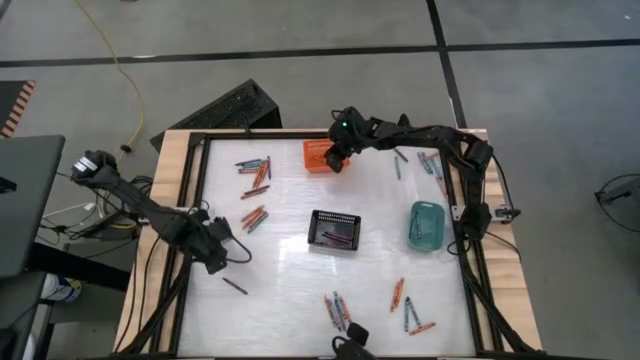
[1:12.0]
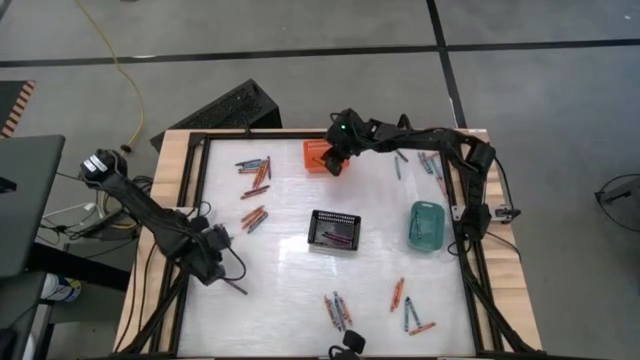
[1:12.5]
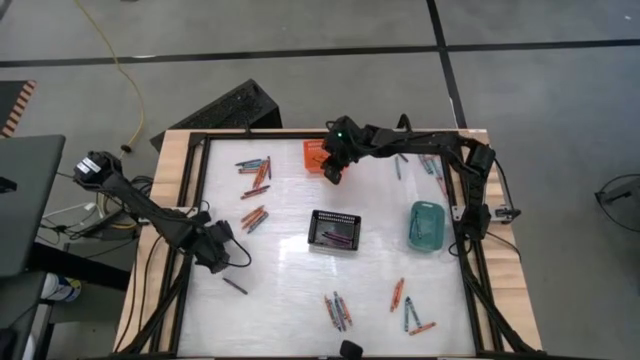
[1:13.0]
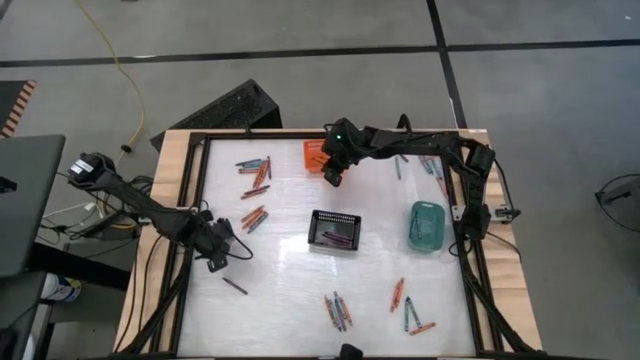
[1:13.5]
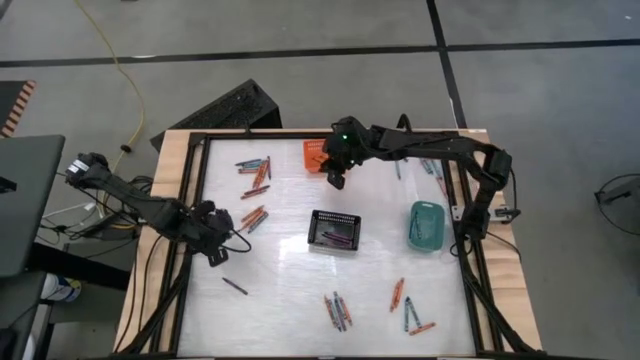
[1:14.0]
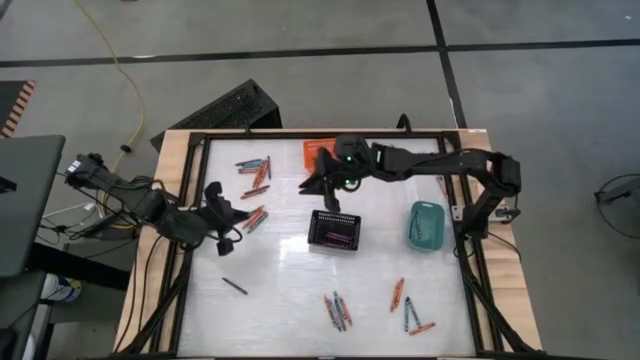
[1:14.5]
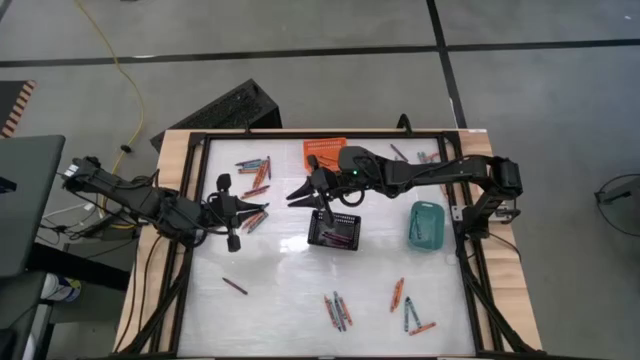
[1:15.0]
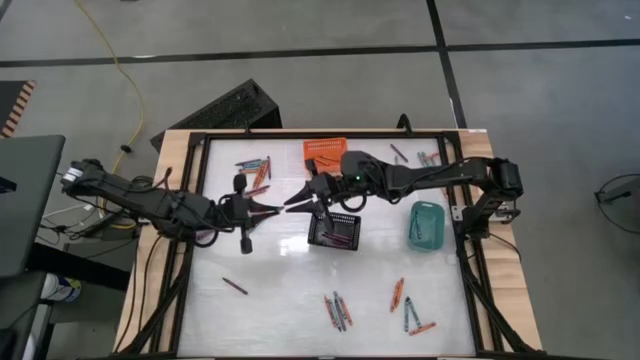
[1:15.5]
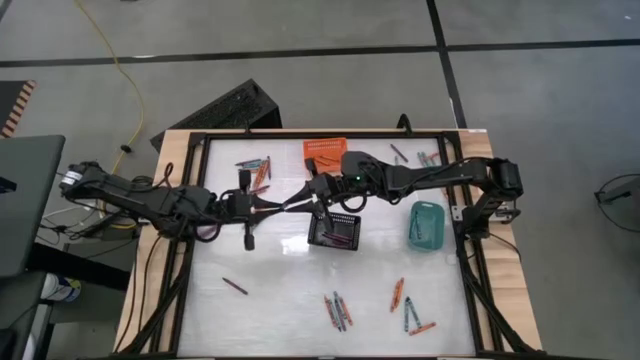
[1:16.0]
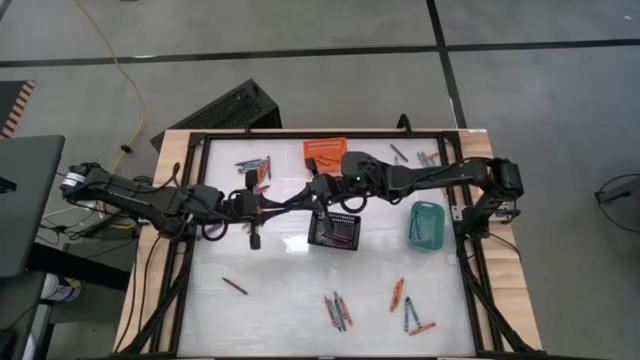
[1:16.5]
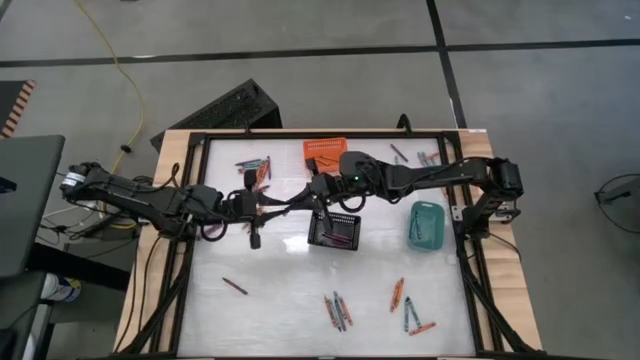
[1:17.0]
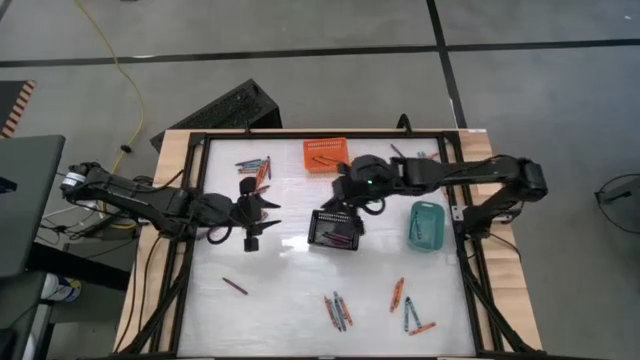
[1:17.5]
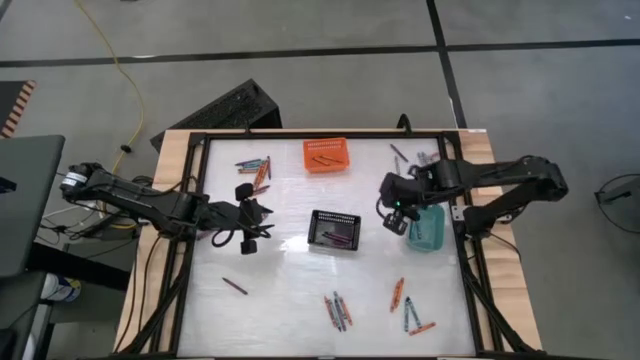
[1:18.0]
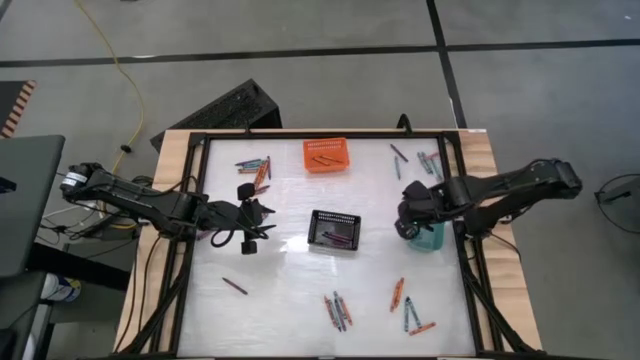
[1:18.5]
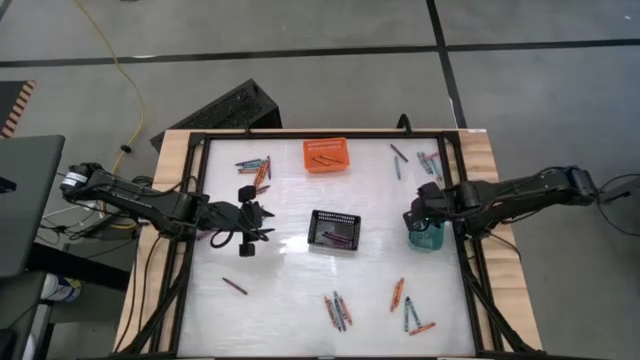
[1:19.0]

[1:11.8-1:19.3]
Task: Sort crayons
Put the light blue green crayon into the green bin

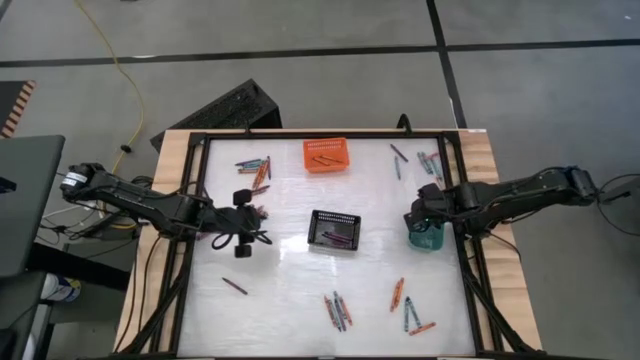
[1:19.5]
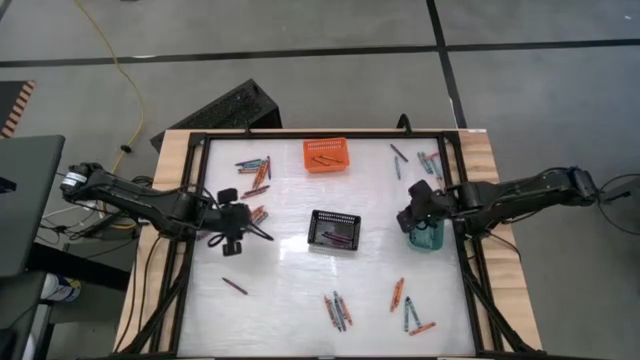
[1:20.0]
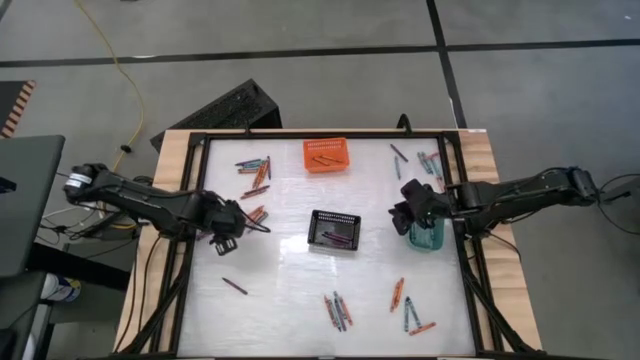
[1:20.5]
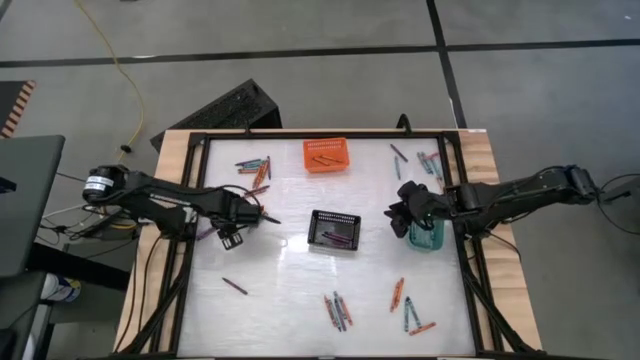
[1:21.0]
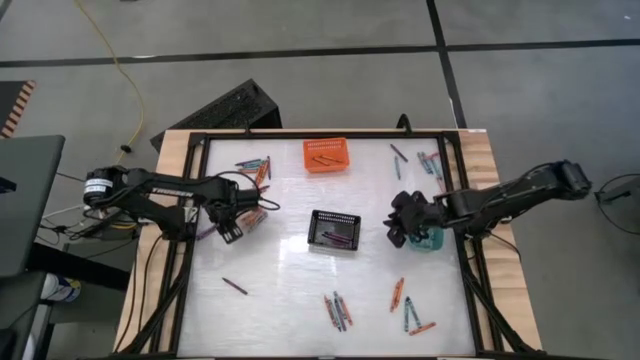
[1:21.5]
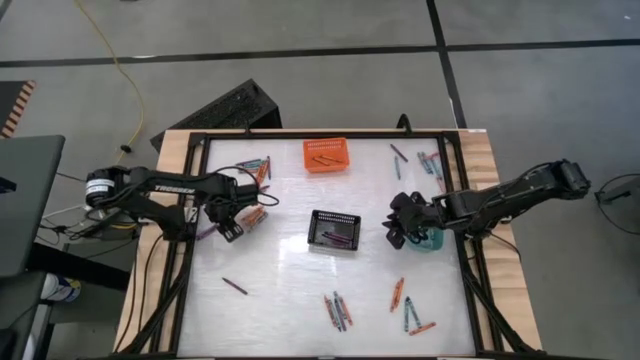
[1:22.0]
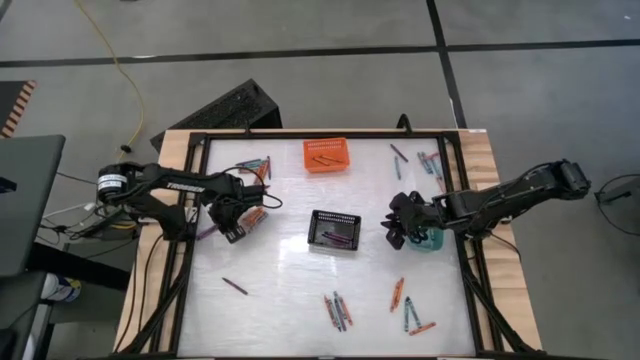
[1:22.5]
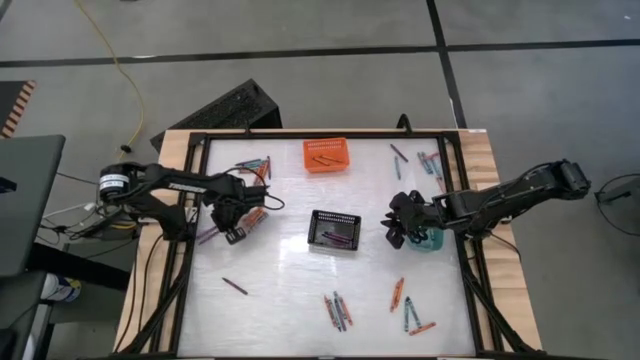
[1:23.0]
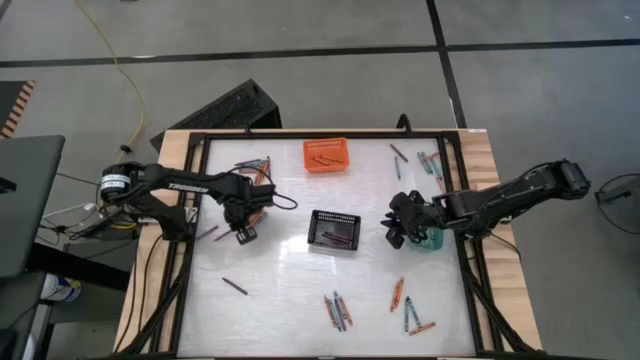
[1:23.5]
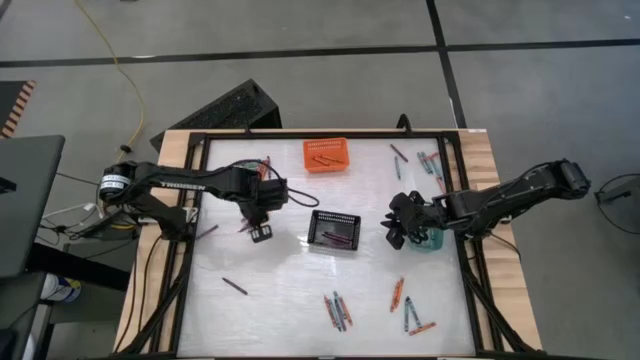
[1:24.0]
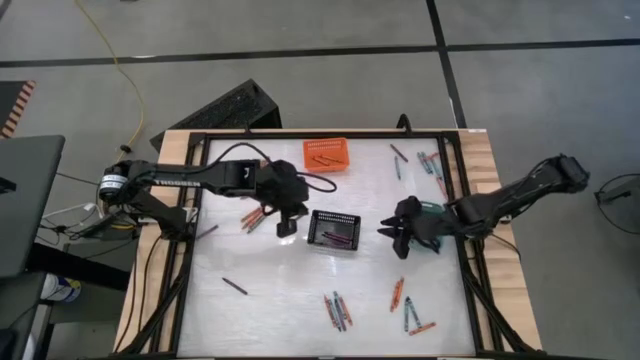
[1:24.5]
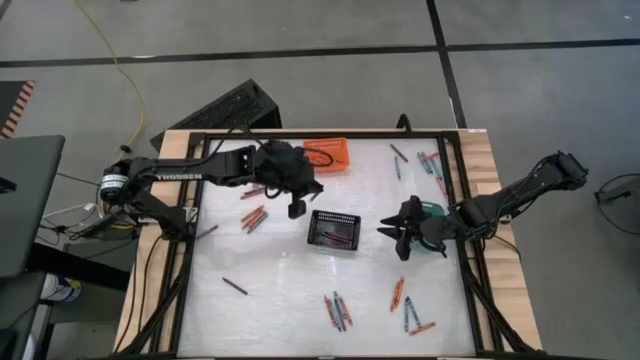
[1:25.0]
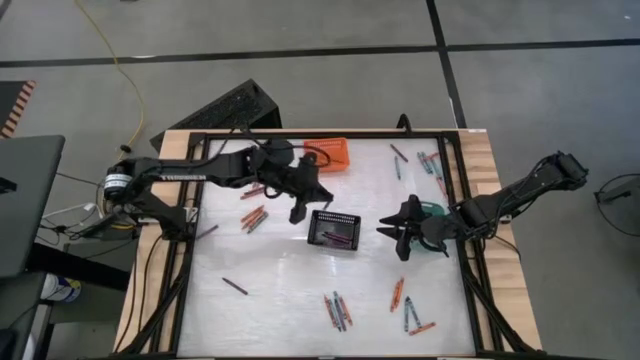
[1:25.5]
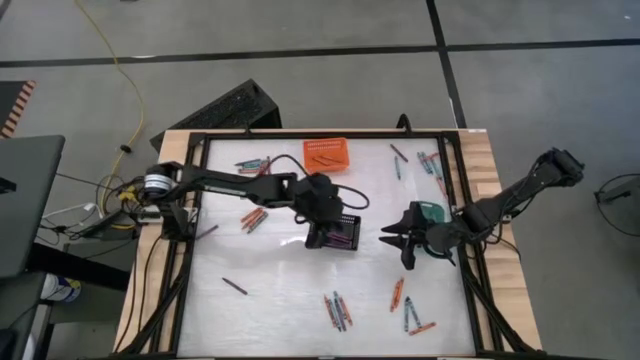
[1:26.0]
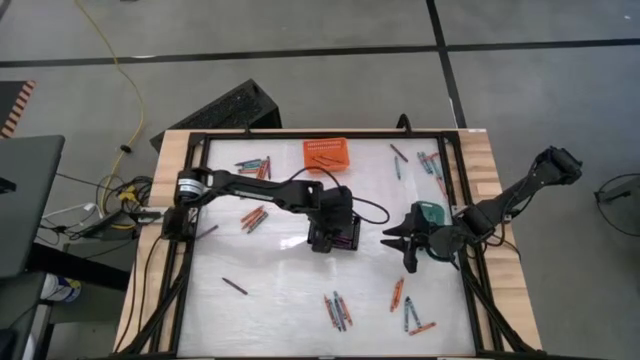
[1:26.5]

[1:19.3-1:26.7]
Put the violet crayon into the black bin

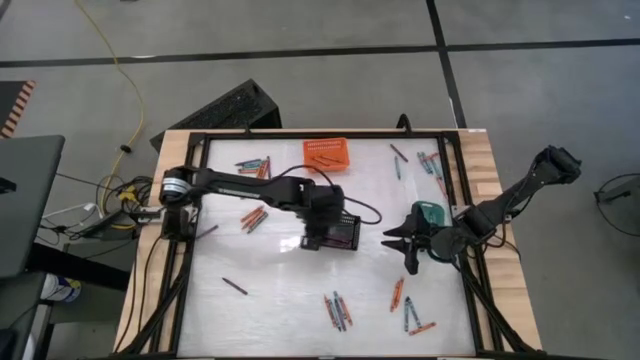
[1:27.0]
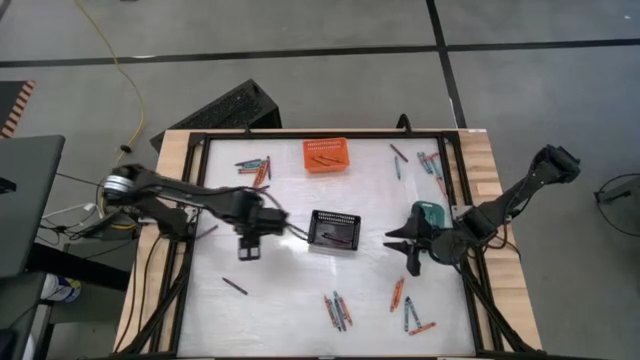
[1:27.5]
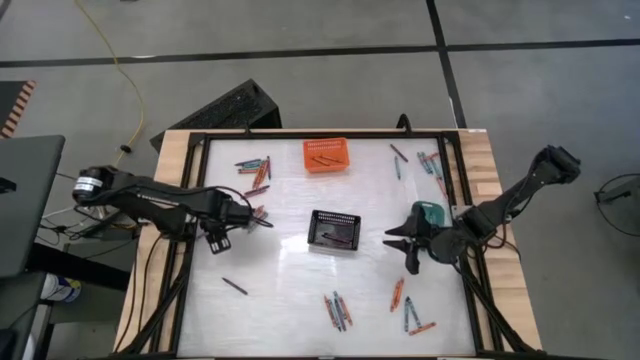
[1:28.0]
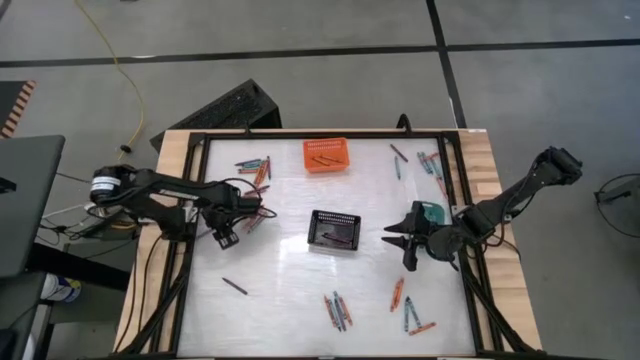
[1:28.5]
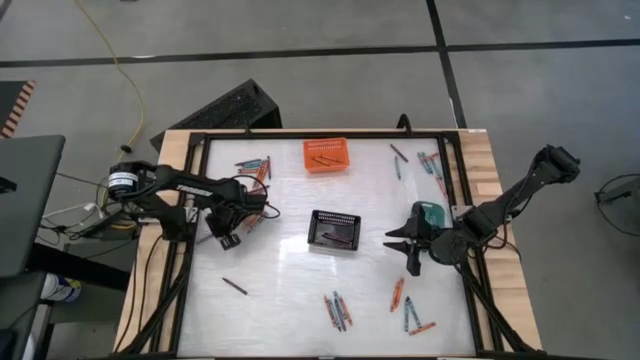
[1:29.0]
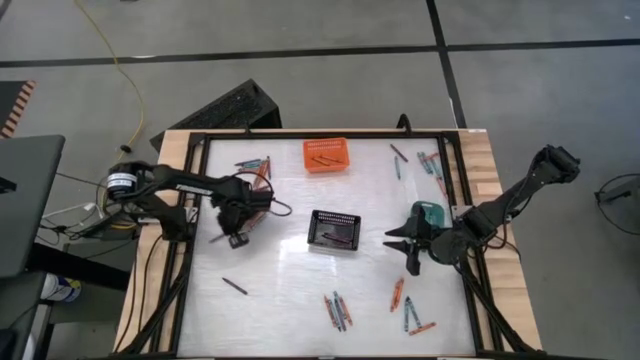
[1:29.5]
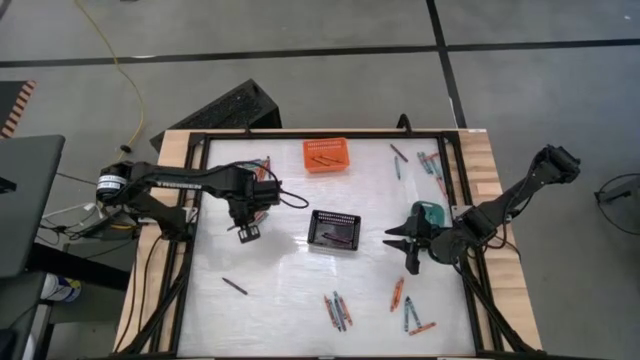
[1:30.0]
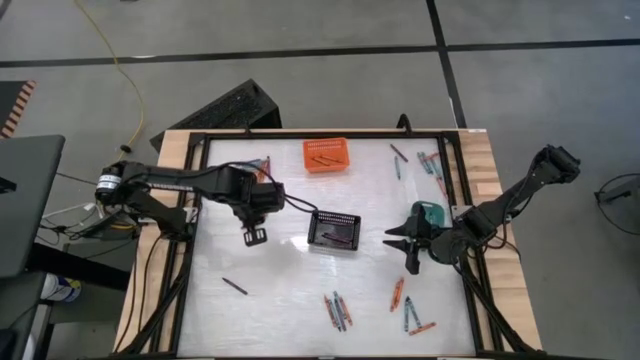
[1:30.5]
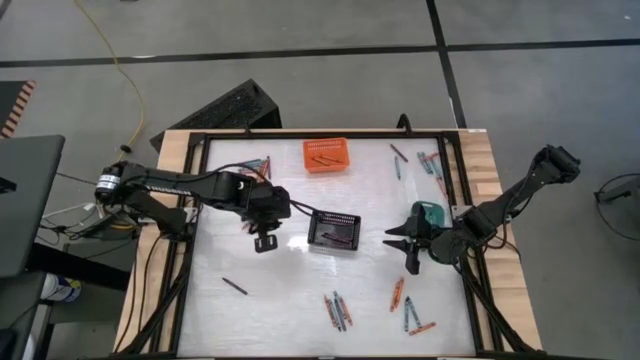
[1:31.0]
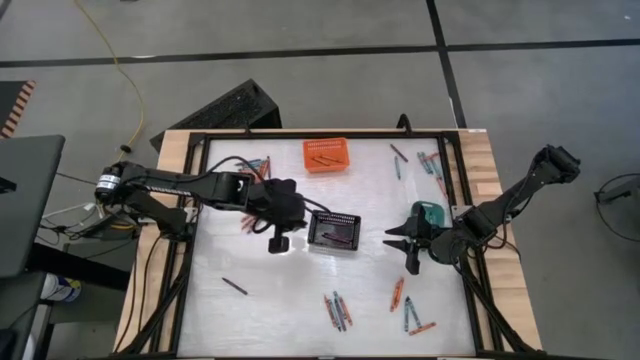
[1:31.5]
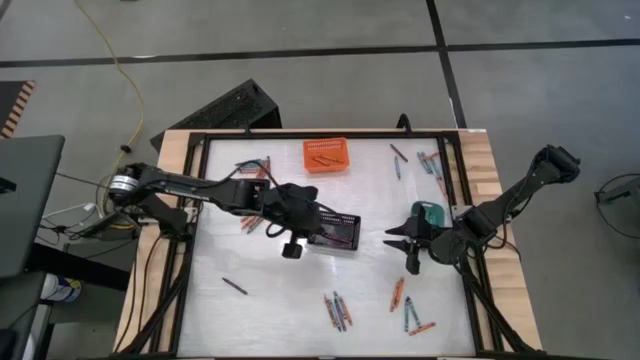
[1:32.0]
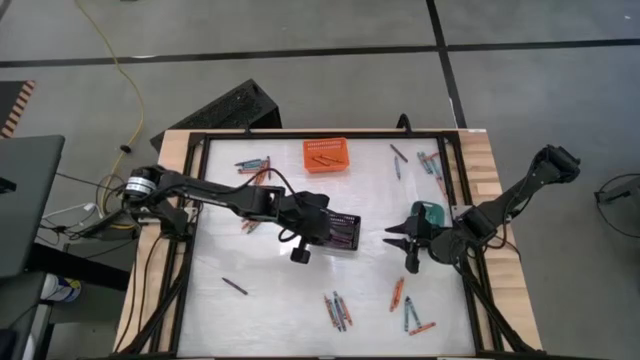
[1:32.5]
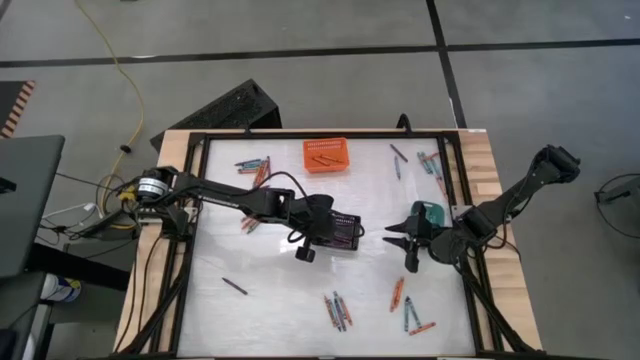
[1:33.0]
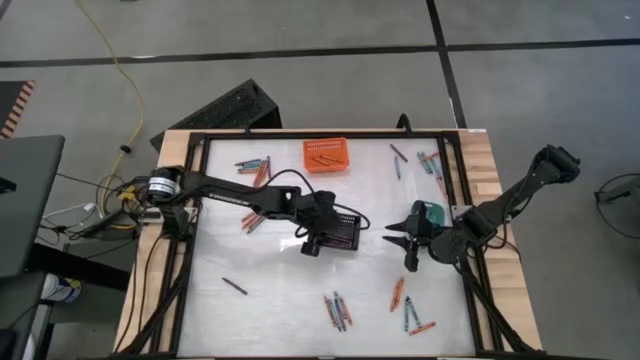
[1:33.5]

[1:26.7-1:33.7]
Put the violet crayon into the black bin
